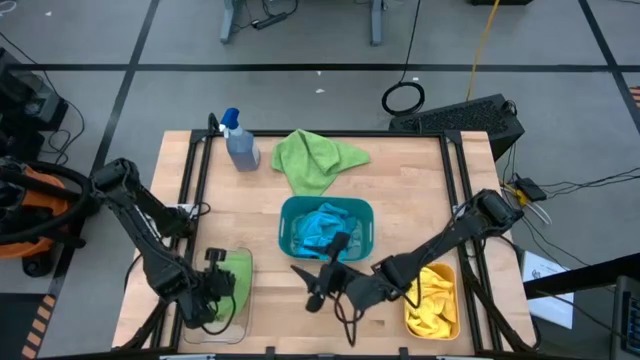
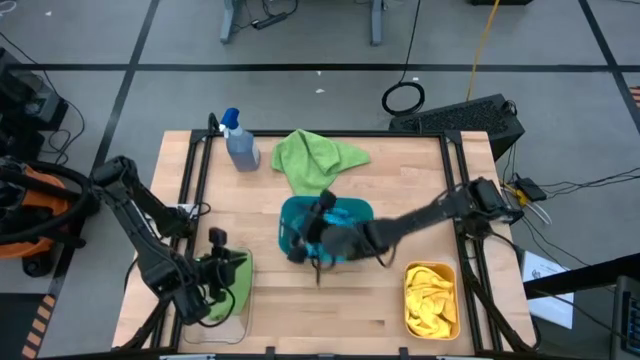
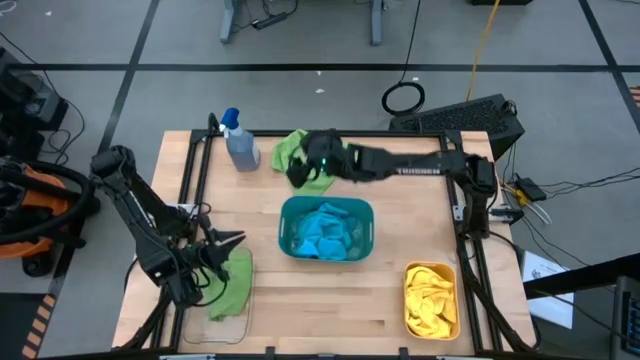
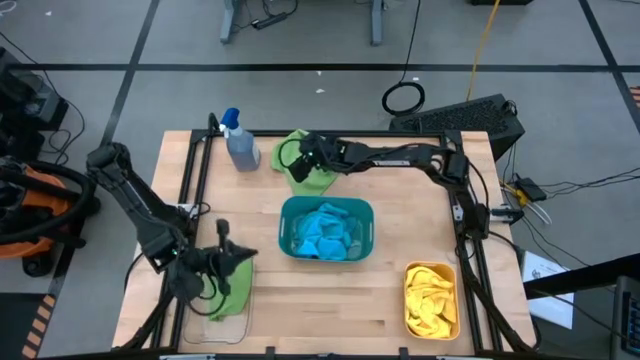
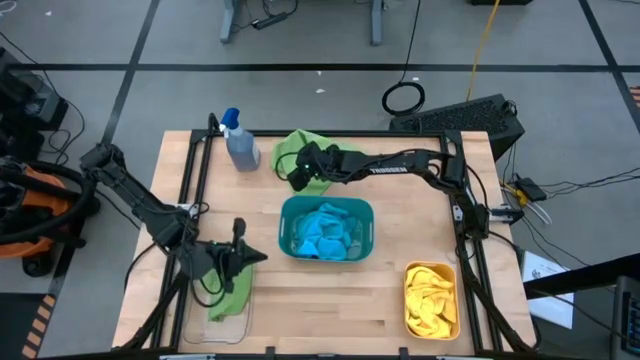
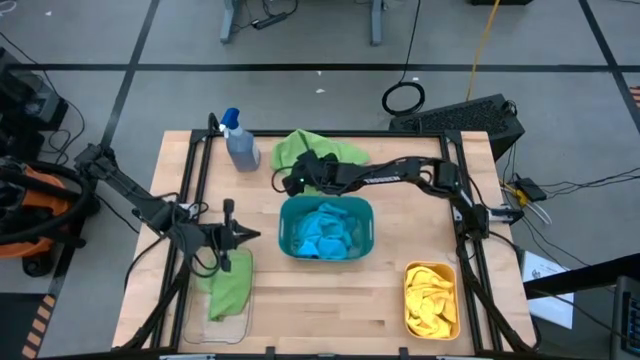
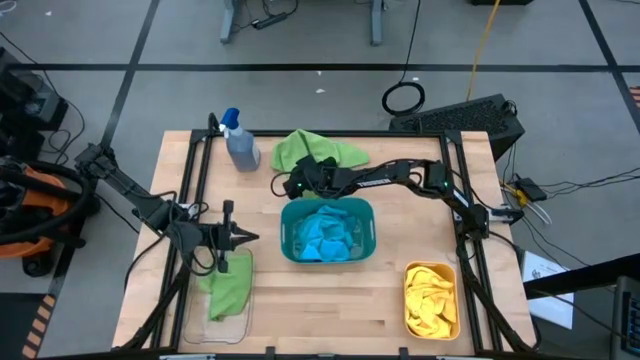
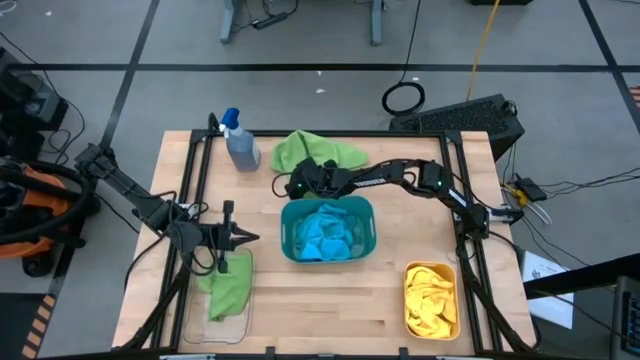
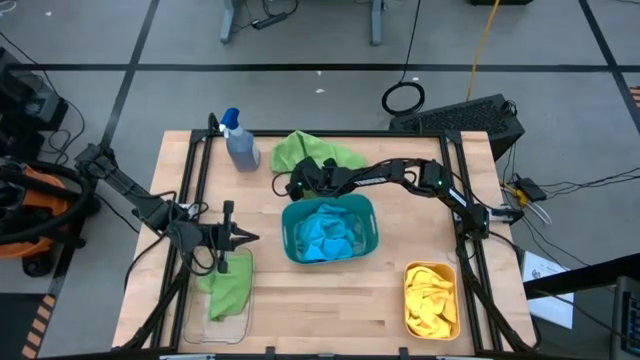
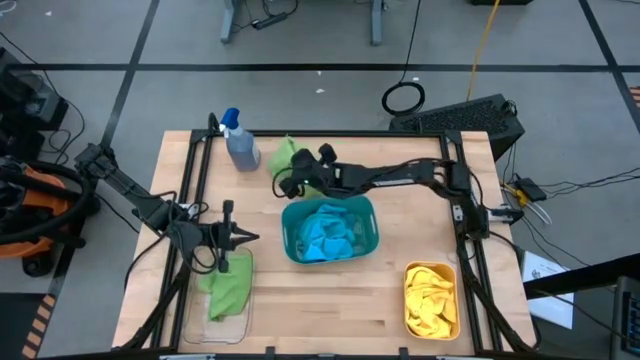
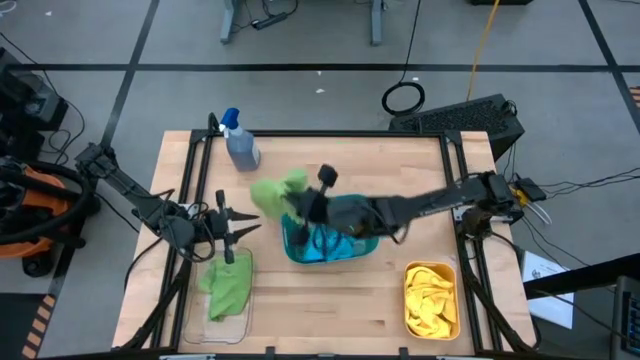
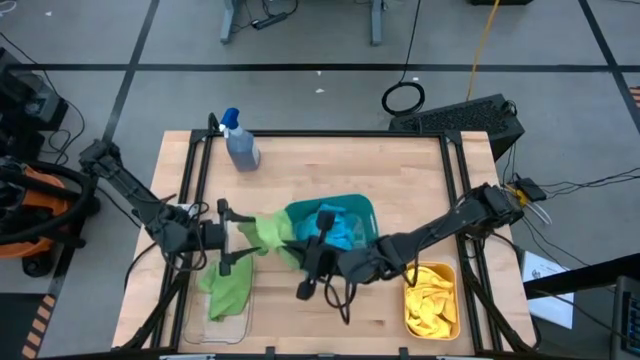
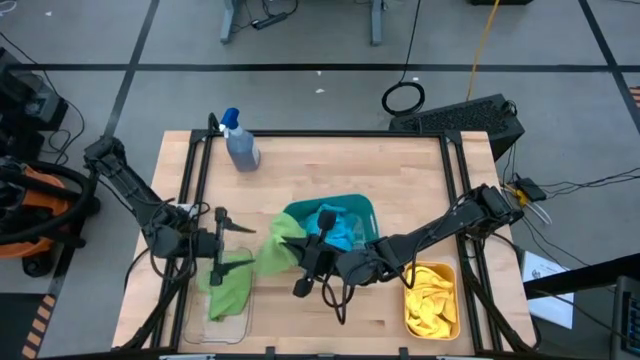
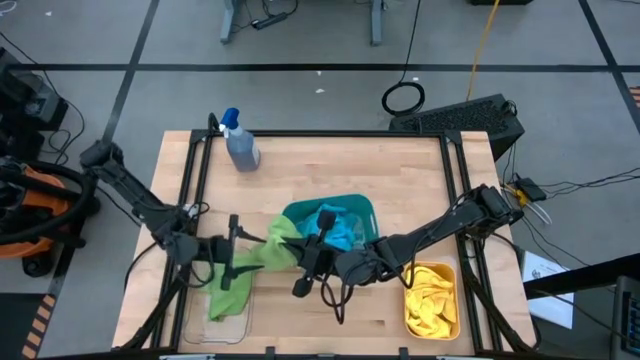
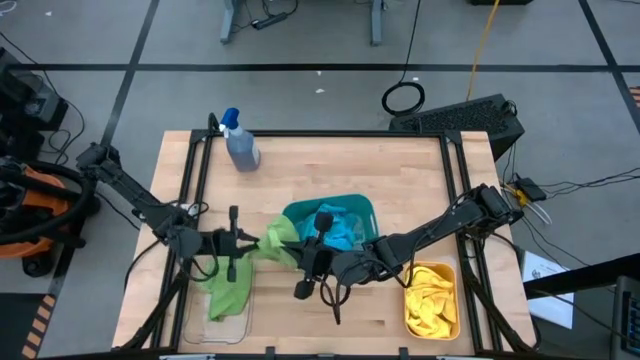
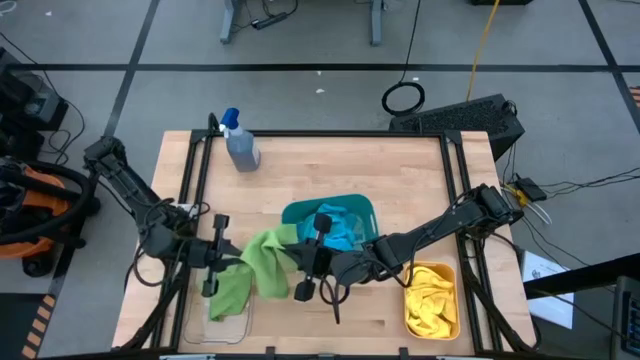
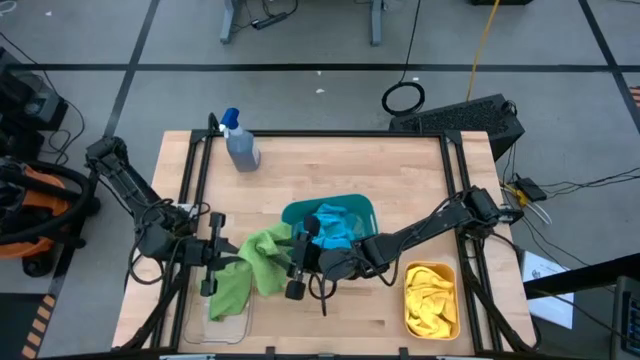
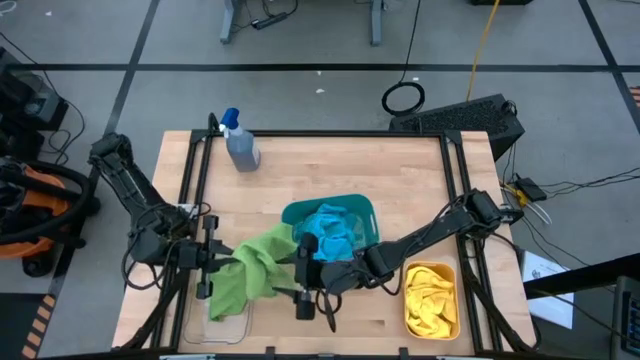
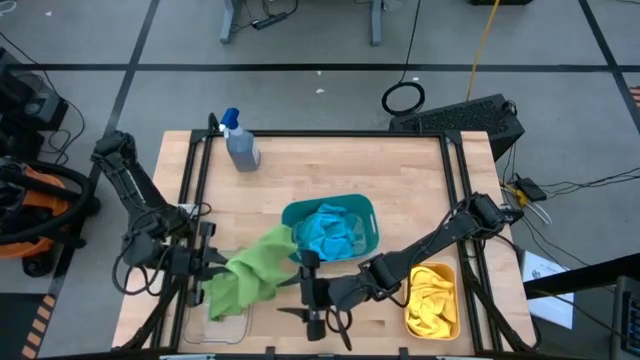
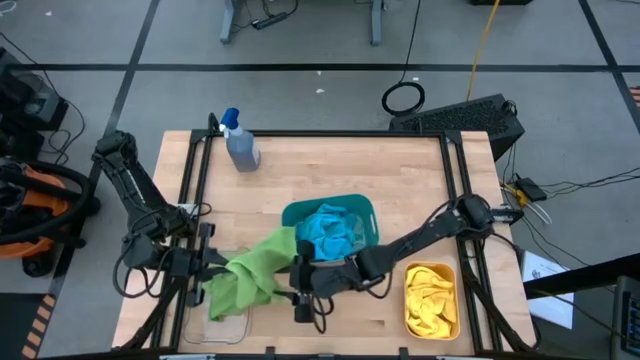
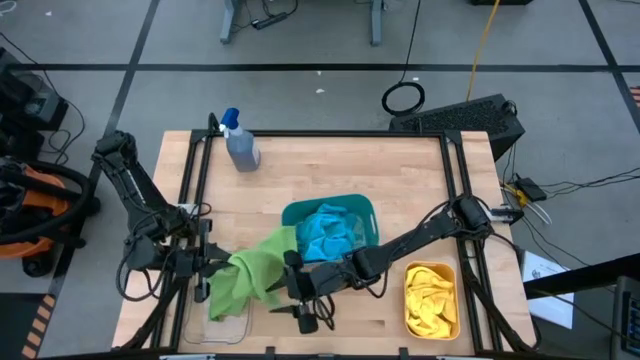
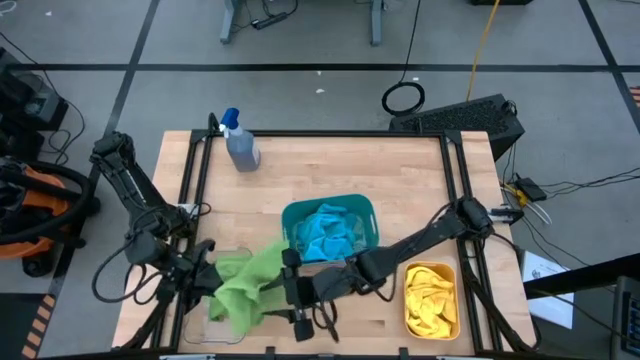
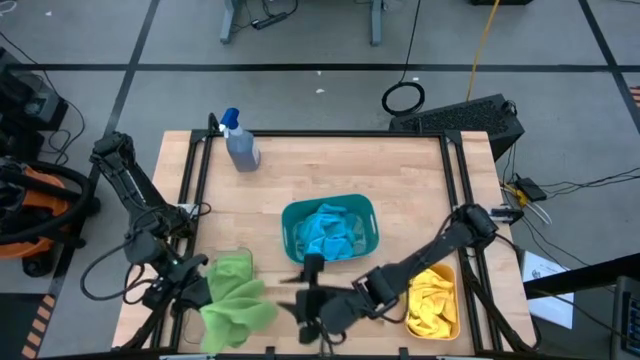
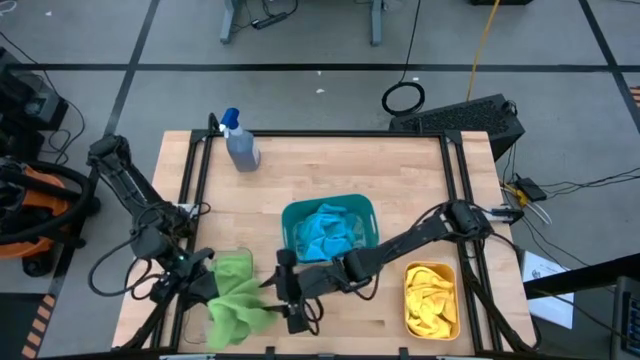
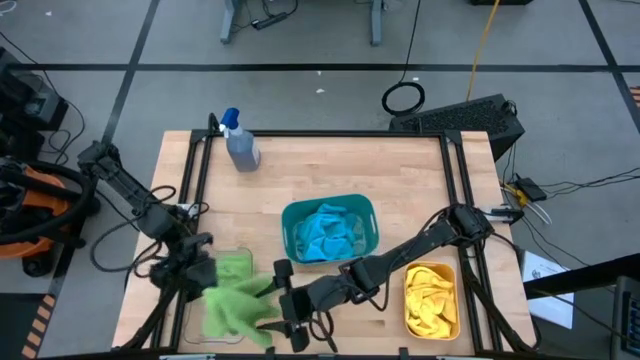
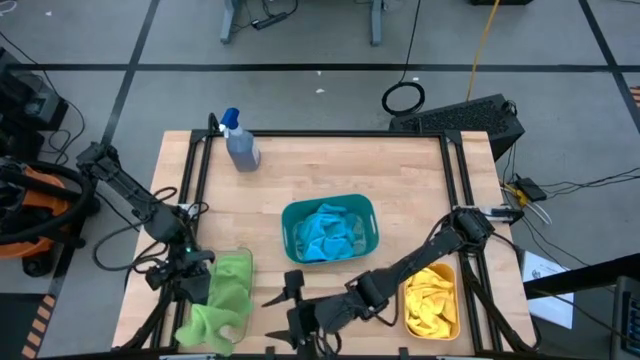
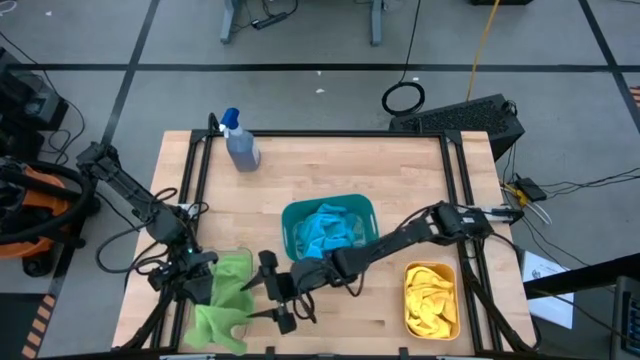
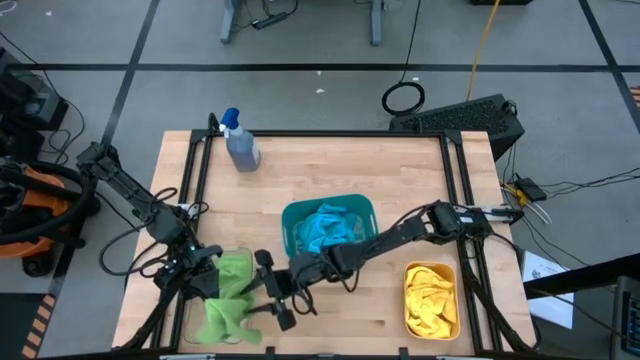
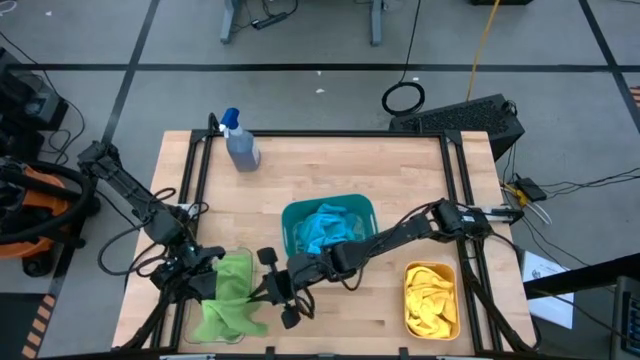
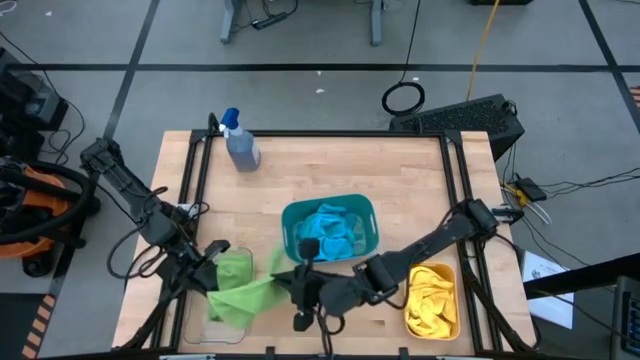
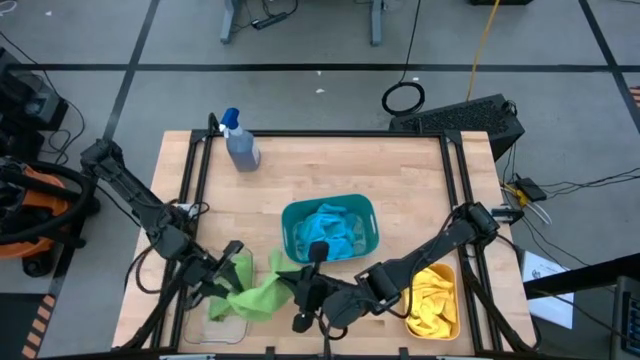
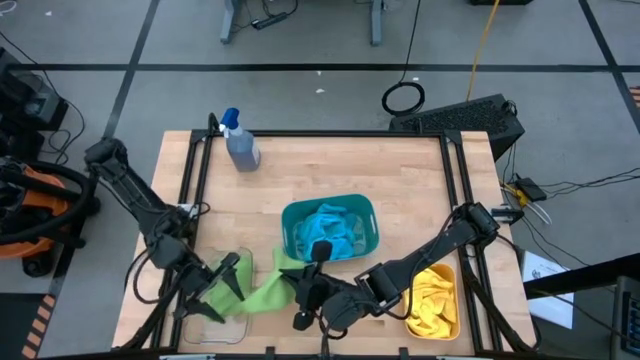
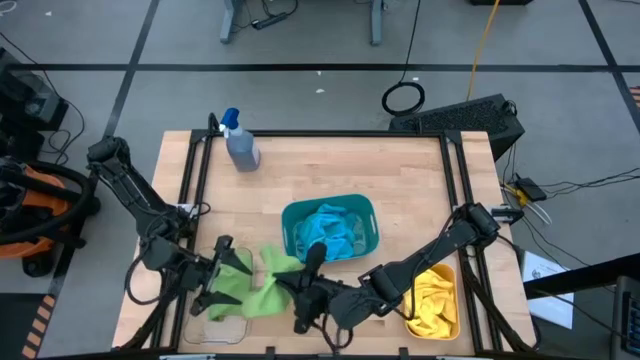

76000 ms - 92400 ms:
Task: Sort microfiber towel by color & place in baskets
Put the green microfiber towel into the transparent bin

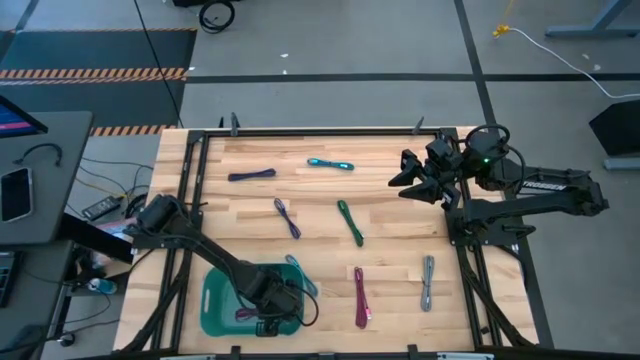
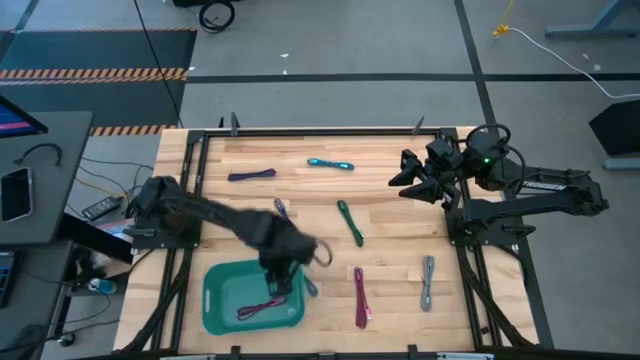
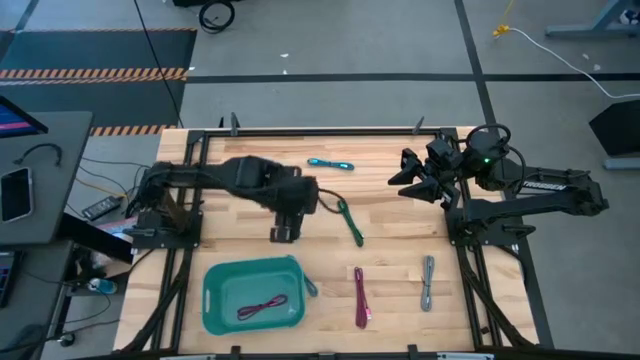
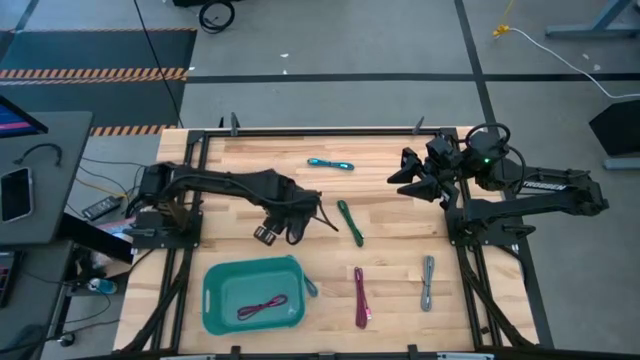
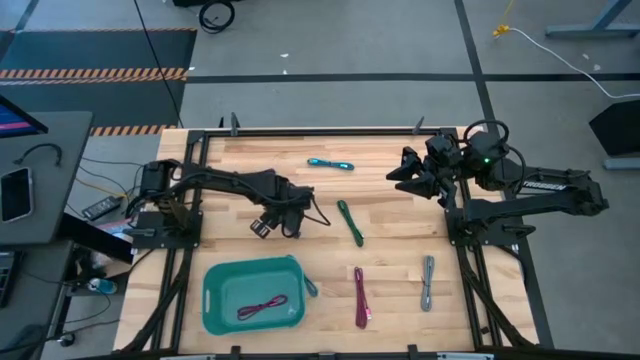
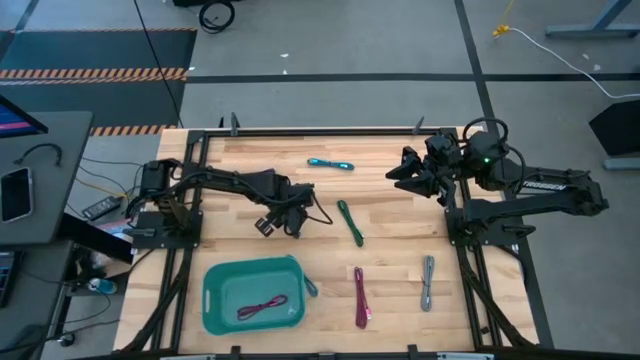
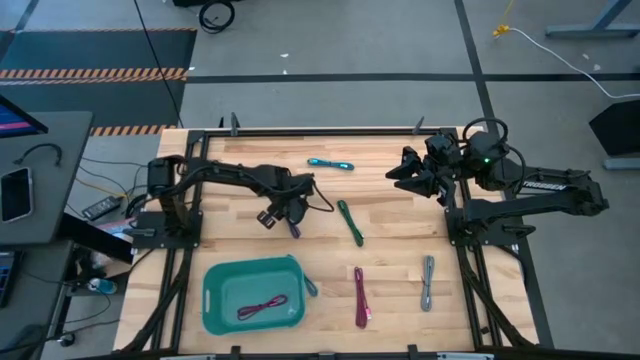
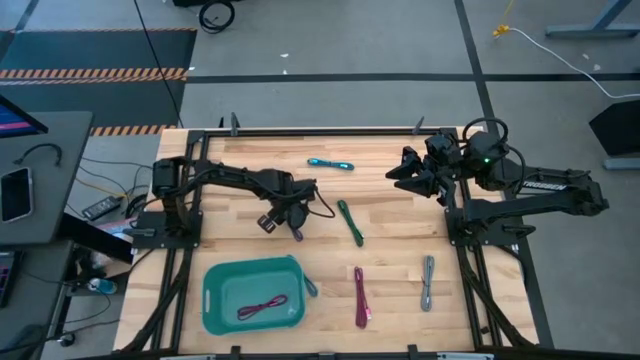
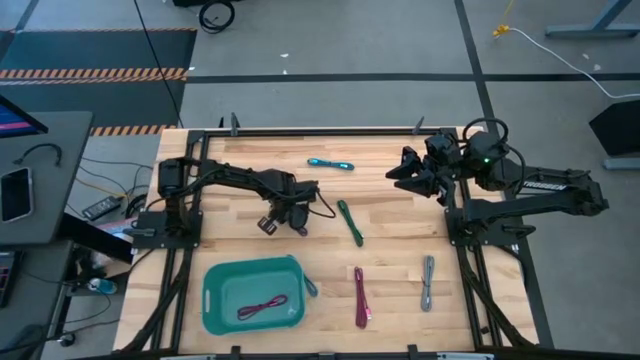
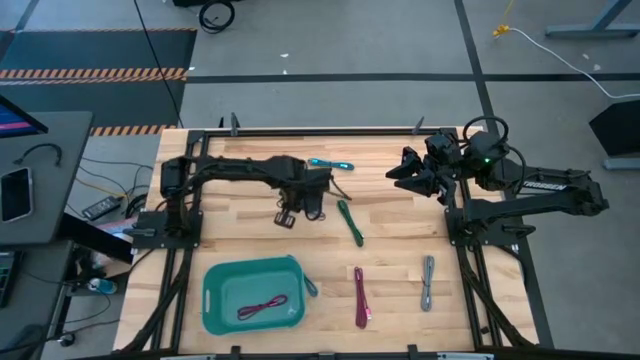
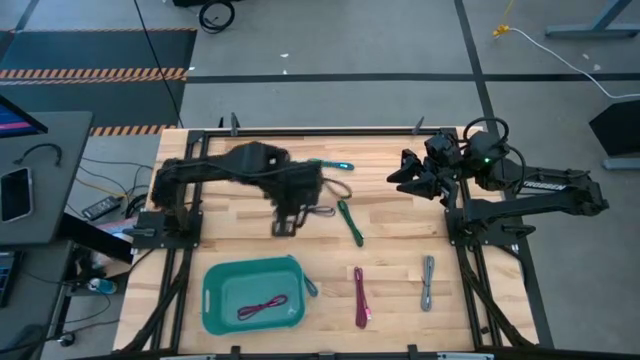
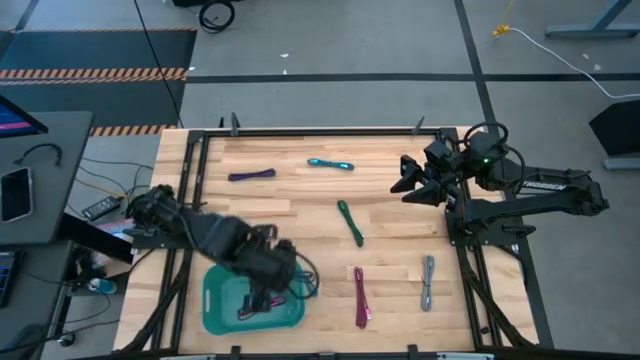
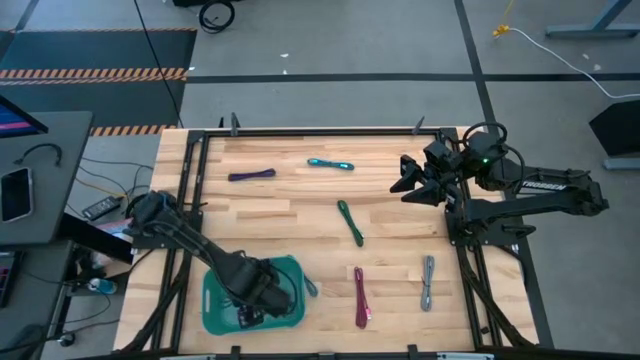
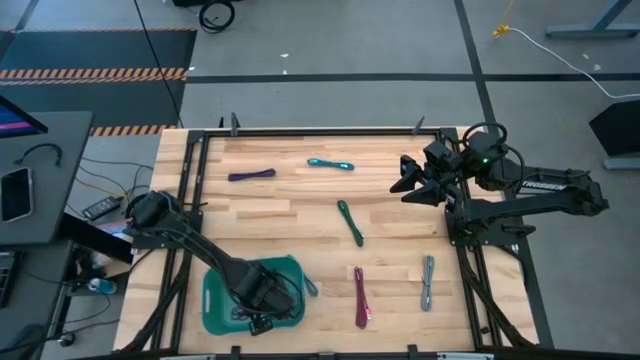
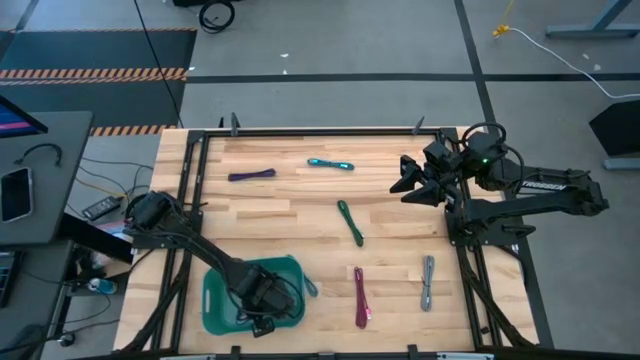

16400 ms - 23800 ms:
Task: Pick and place USB-C Cables
Put the bottom blue charger cable into the bin
